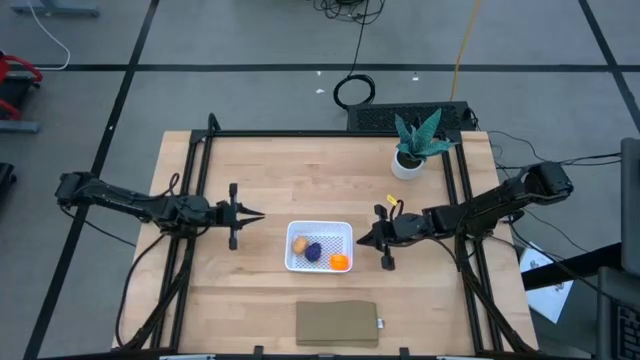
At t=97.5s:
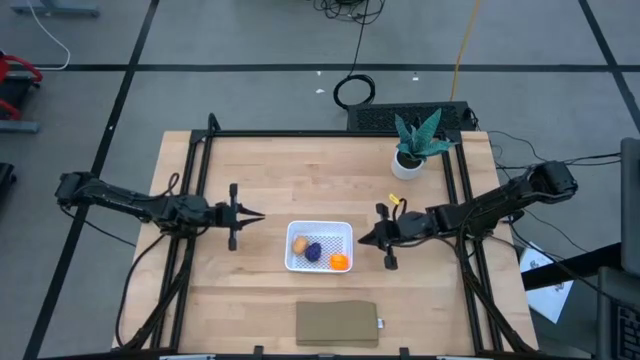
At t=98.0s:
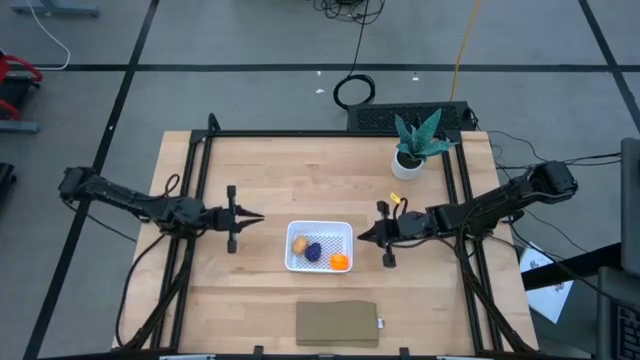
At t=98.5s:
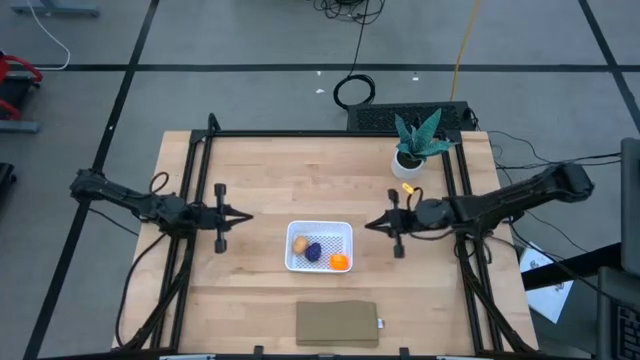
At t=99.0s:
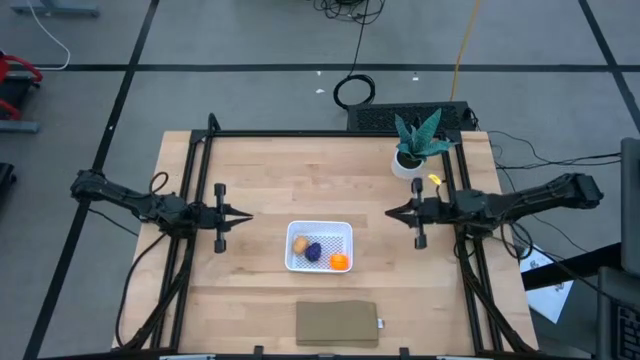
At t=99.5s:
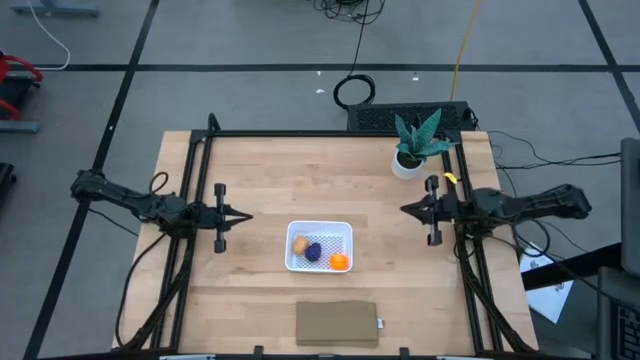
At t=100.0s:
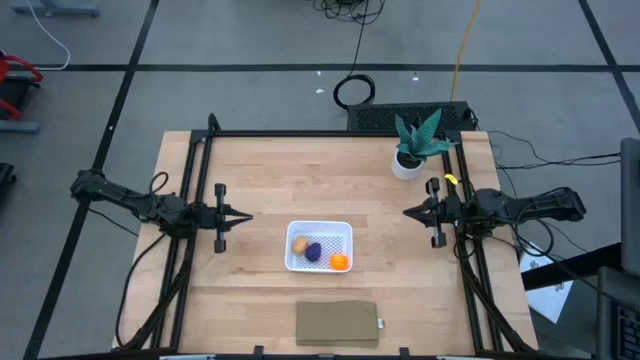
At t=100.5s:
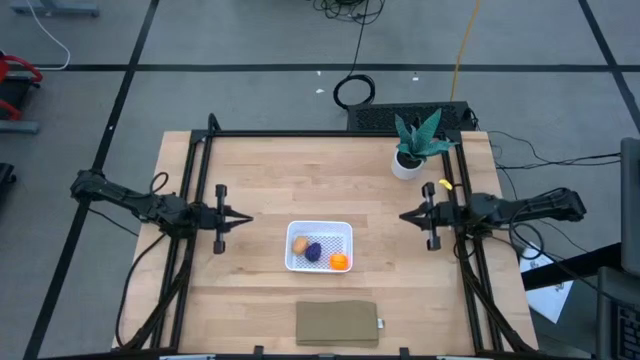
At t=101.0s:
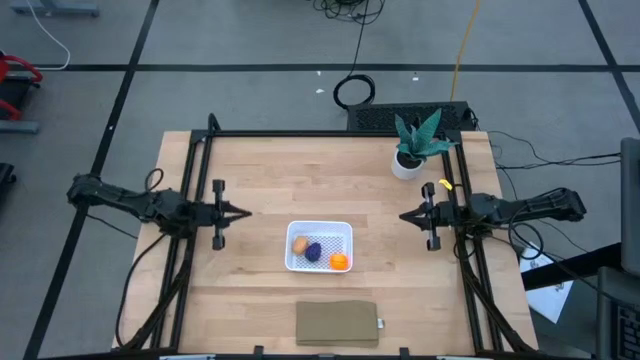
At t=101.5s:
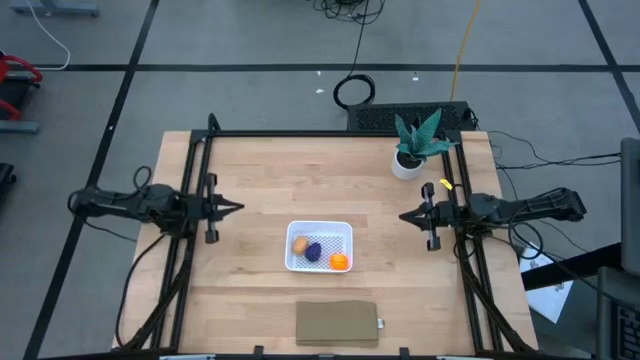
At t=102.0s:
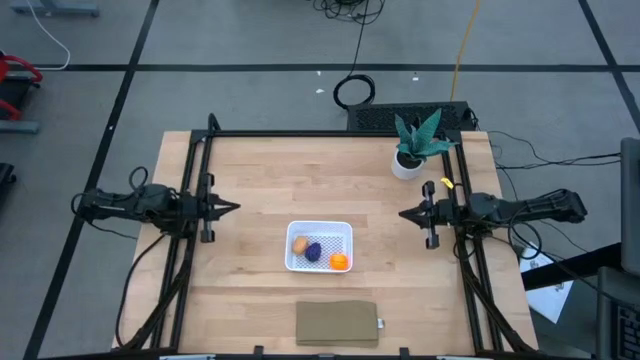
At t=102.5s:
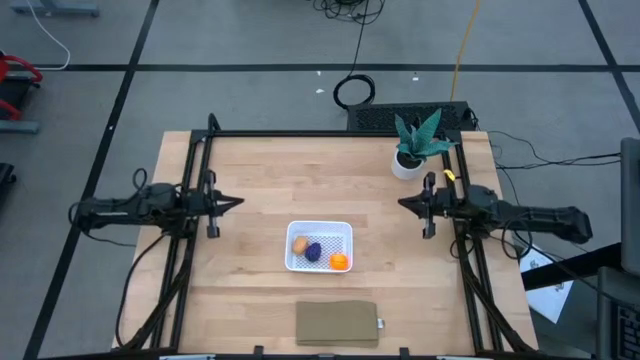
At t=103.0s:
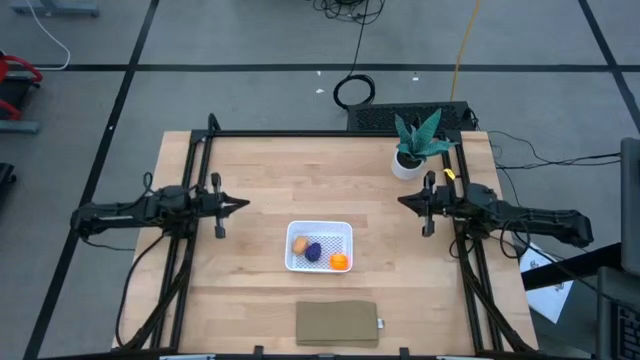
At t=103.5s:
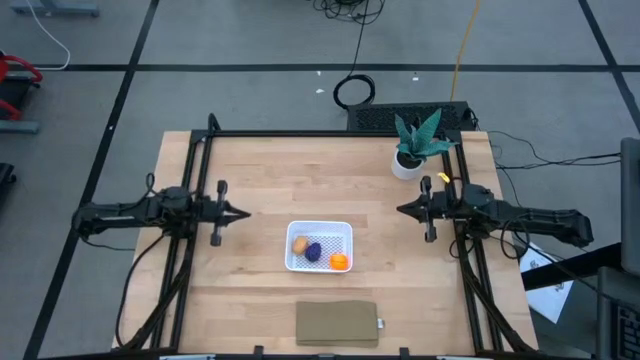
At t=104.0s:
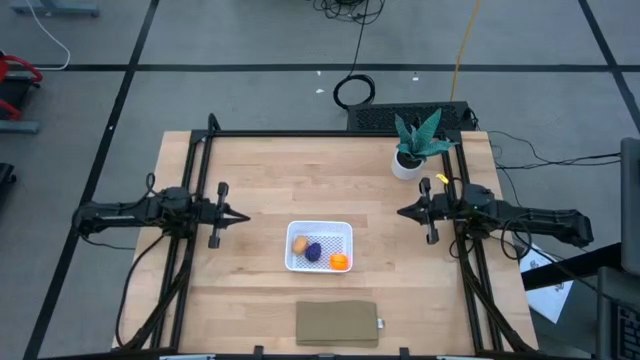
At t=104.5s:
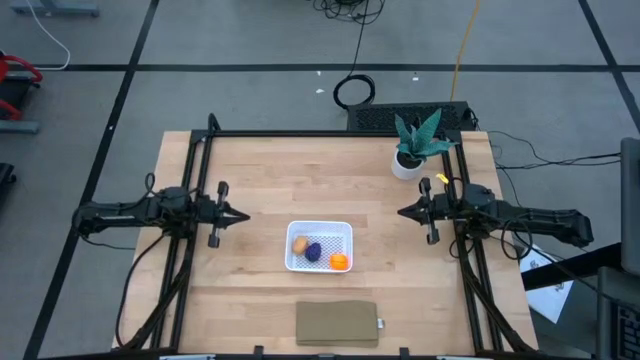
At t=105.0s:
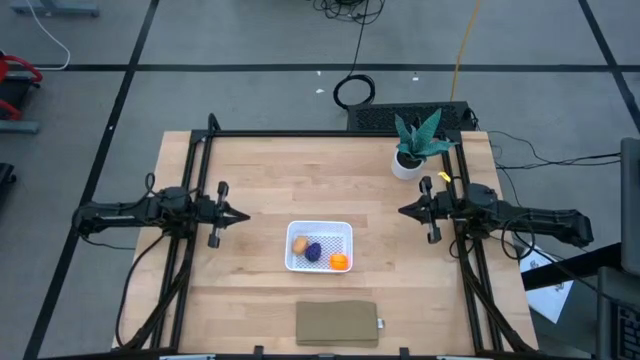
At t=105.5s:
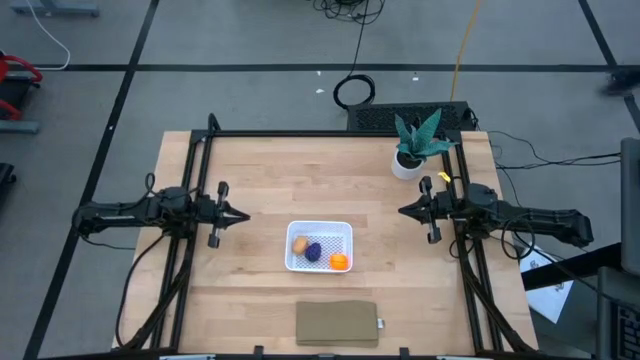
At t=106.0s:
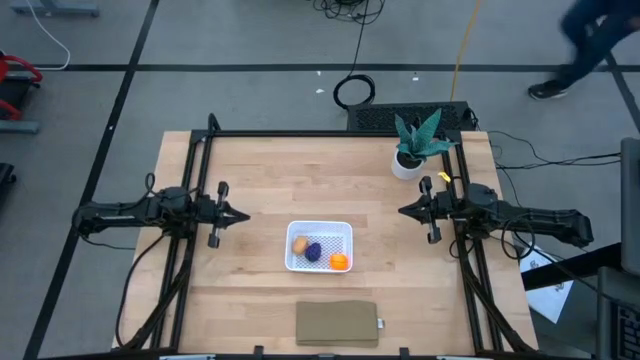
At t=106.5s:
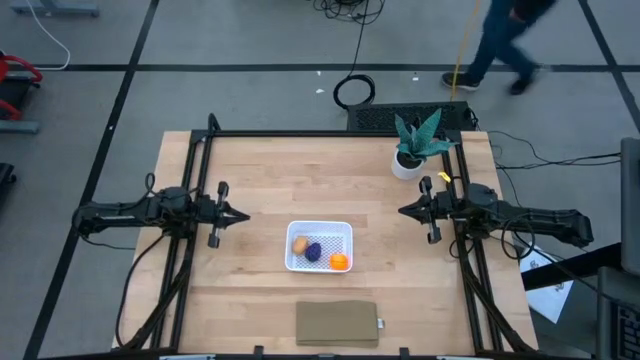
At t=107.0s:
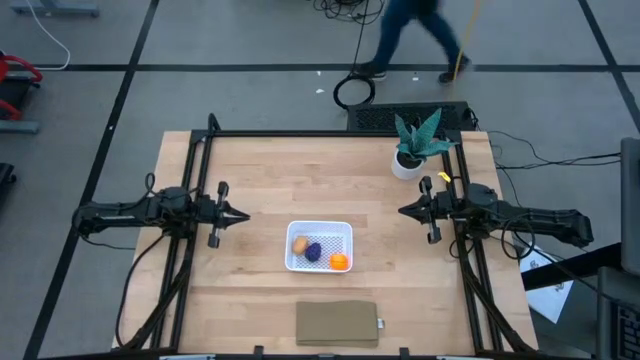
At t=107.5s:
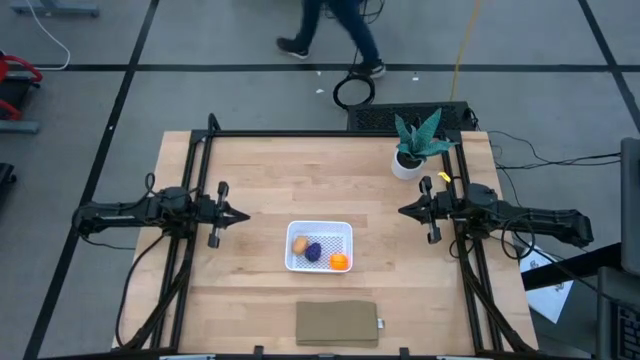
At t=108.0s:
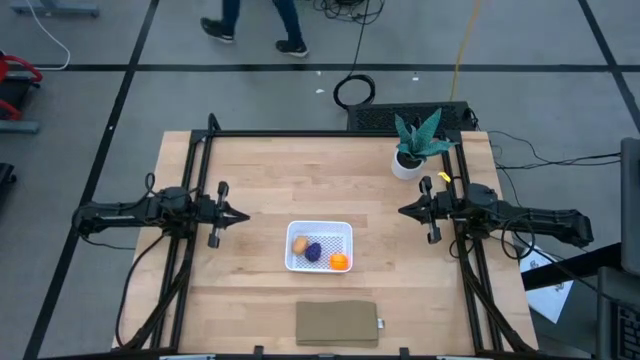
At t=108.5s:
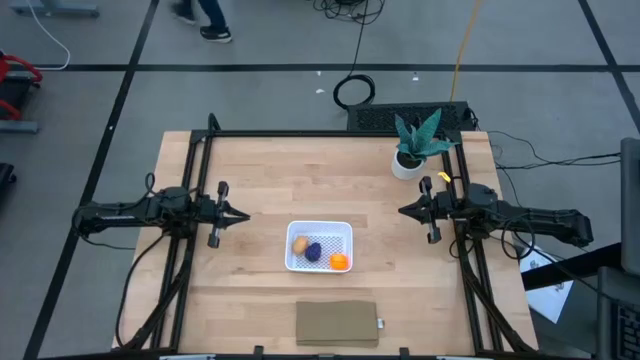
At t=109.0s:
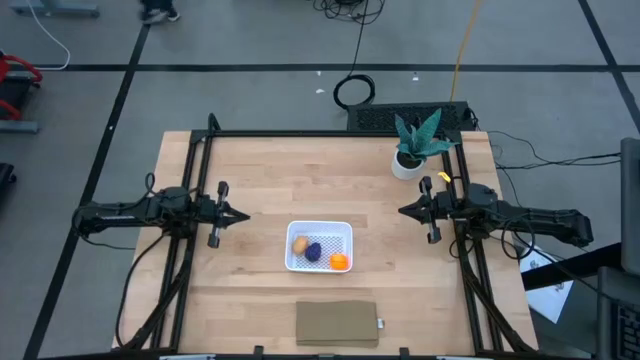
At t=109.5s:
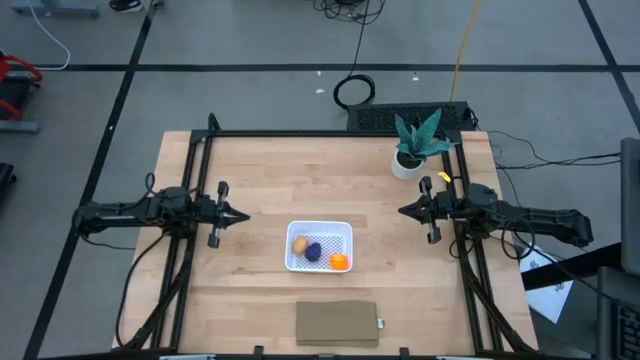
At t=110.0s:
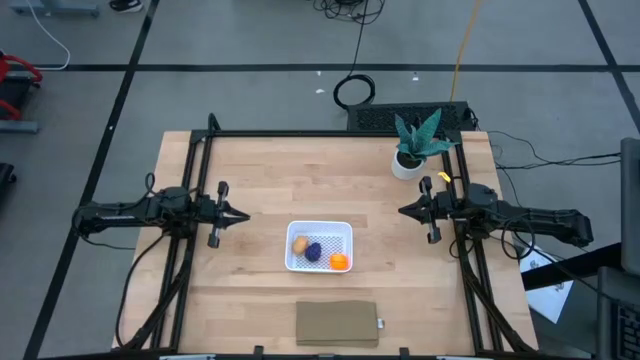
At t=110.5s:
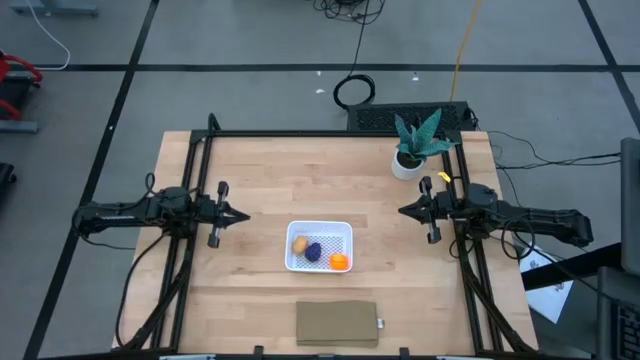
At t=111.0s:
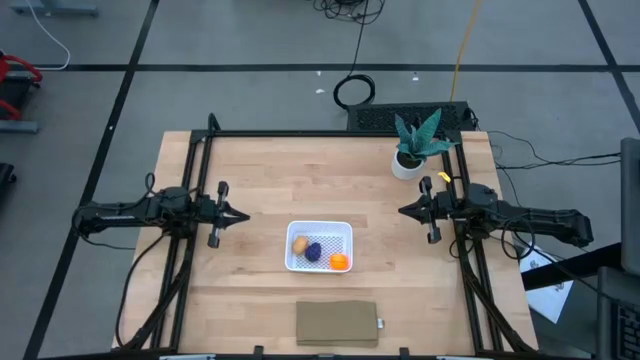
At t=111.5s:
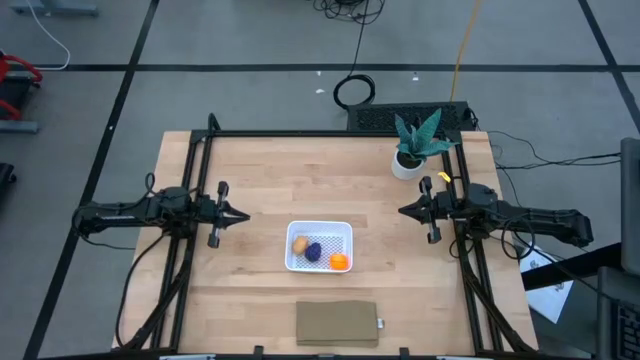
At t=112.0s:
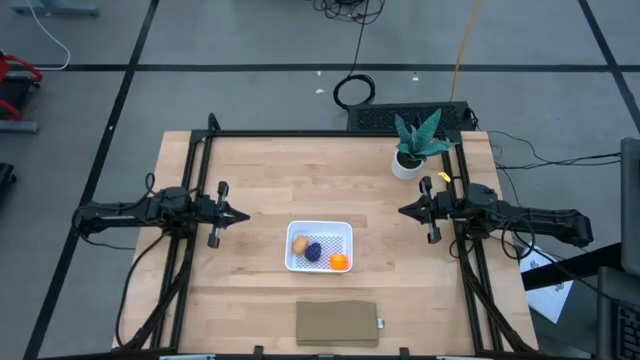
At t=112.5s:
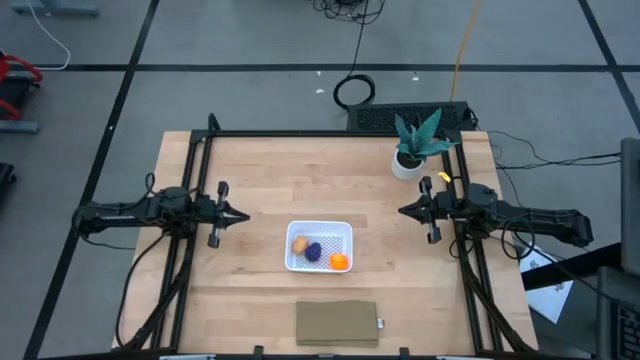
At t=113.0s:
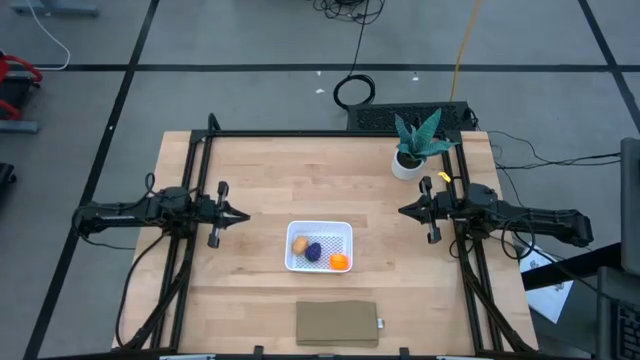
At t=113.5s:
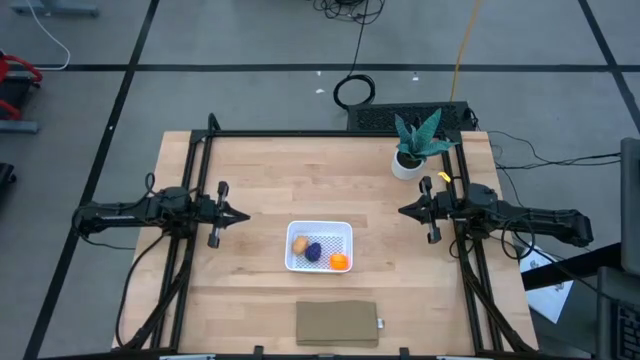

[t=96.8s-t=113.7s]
Task: Pick and placing Produce into tupperware
Return to Home Position

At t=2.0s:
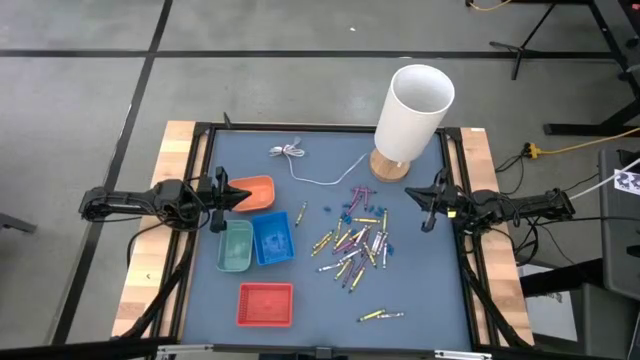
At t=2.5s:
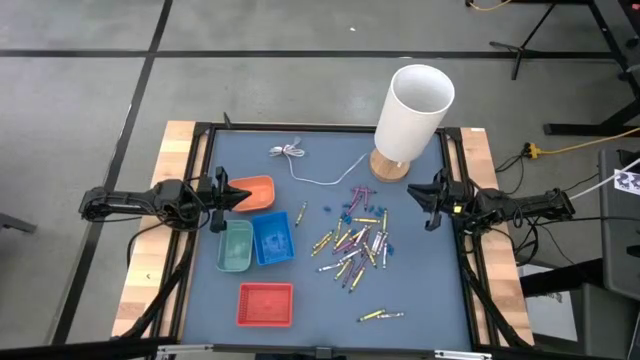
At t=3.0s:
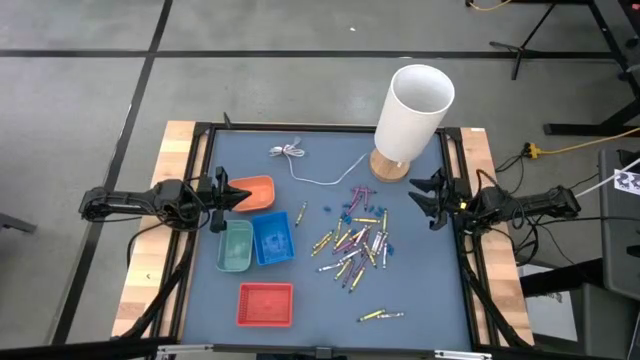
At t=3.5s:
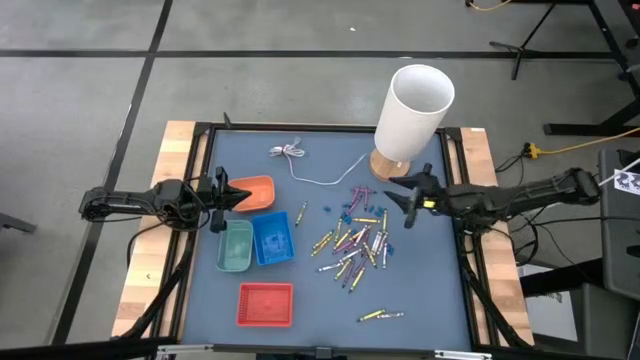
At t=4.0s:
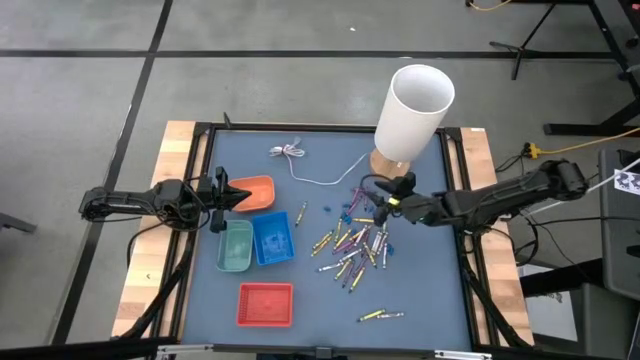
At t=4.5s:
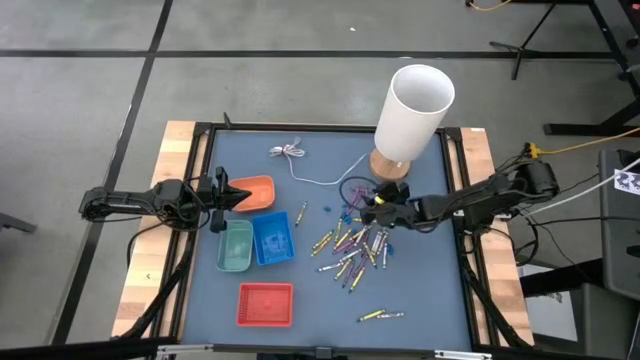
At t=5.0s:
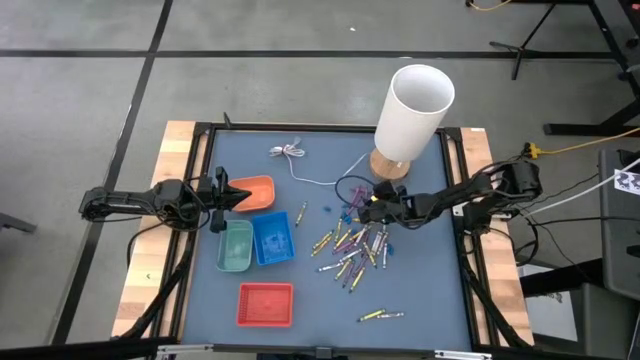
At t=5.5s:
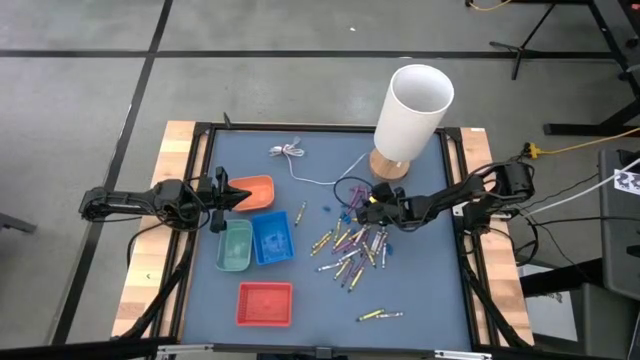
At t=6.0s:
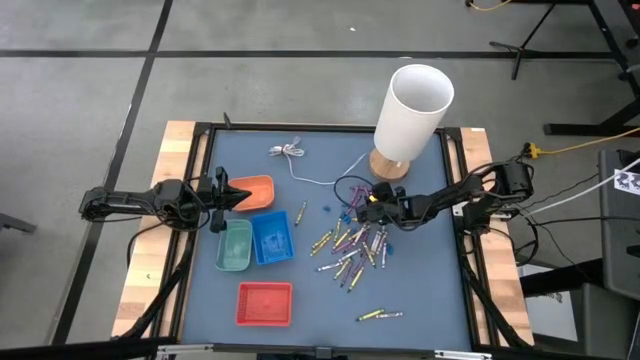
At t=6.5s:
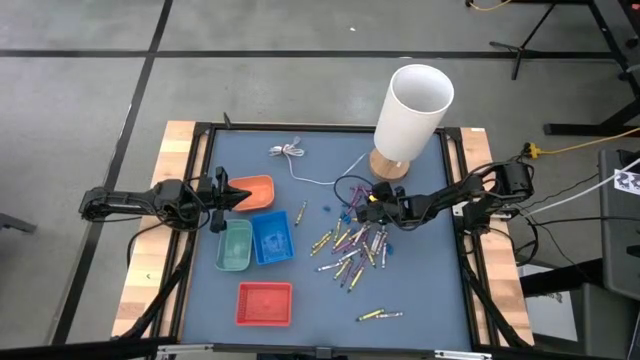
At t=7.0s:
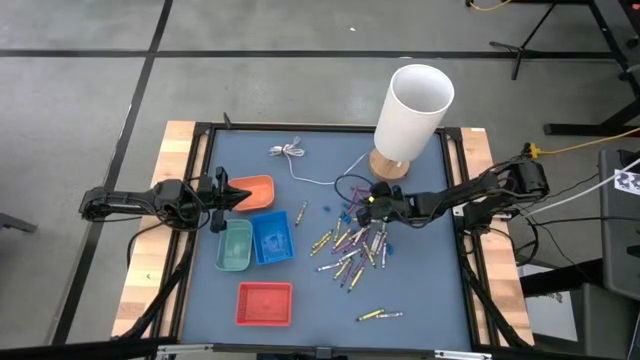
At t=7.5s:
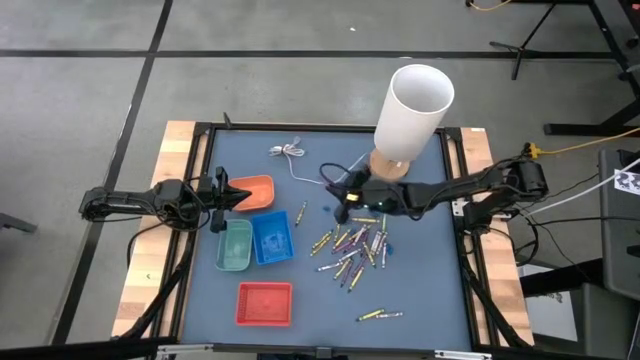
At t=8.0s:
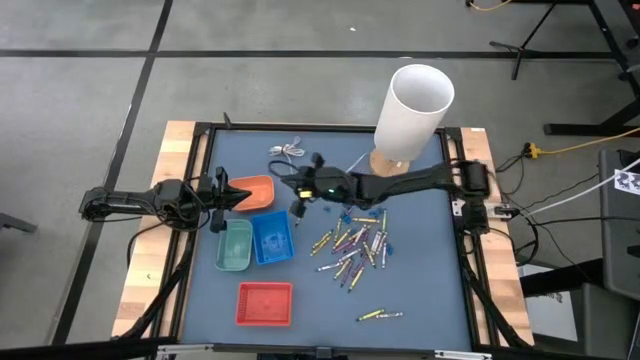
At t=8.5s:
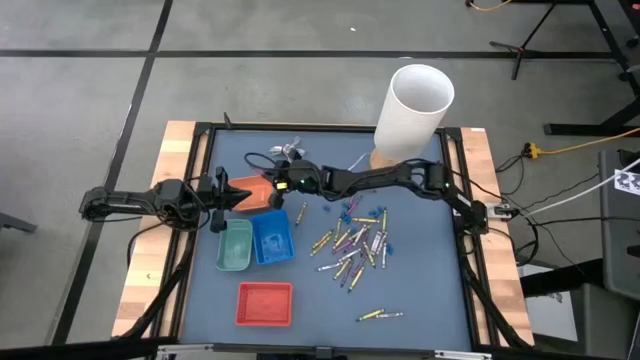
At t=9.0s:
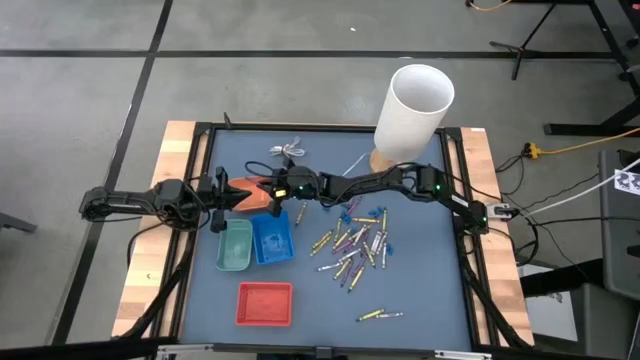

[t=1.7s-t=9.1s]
Task: Sort crayons
Put the violet crayon into the orange bin
